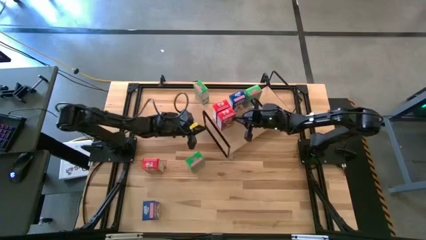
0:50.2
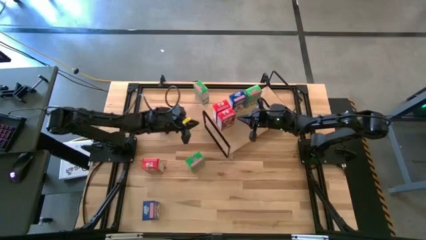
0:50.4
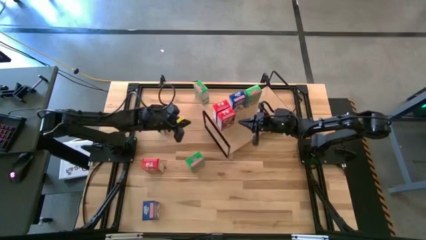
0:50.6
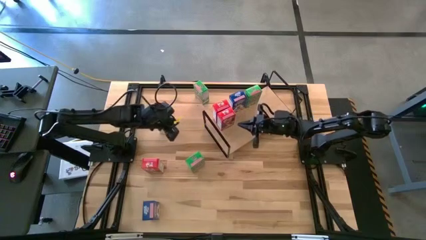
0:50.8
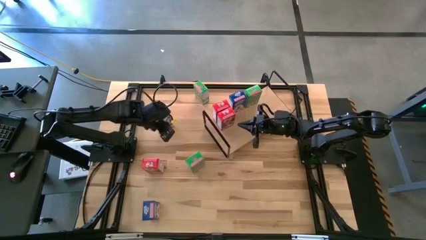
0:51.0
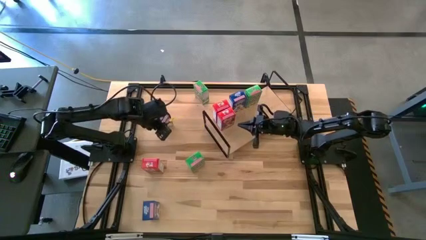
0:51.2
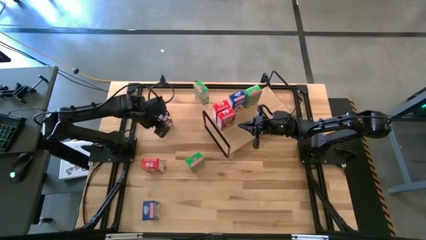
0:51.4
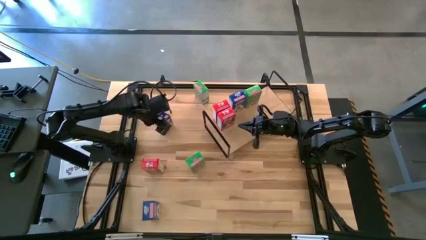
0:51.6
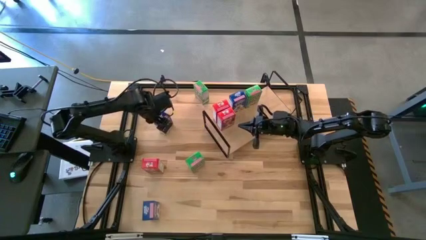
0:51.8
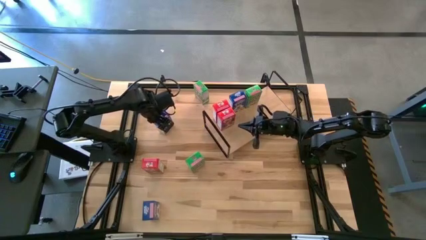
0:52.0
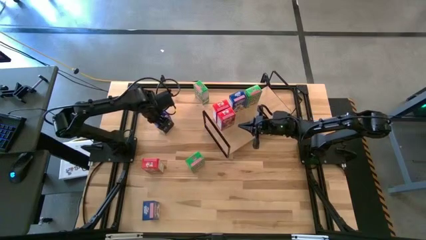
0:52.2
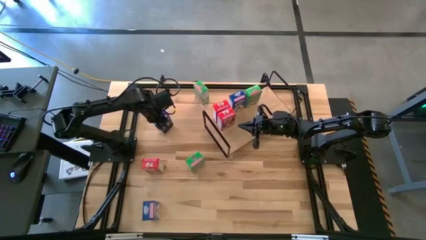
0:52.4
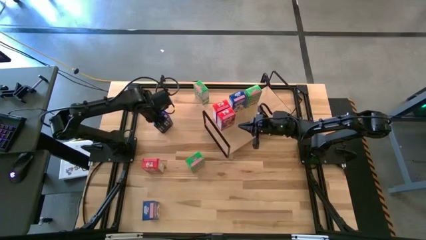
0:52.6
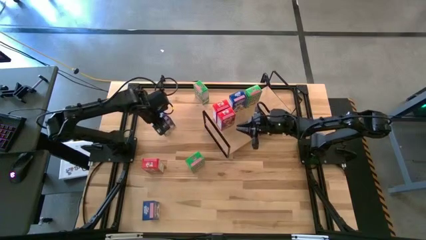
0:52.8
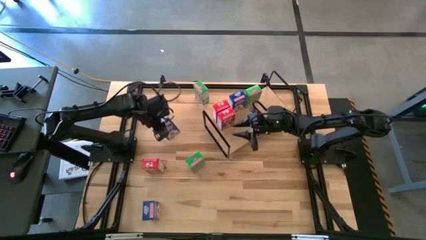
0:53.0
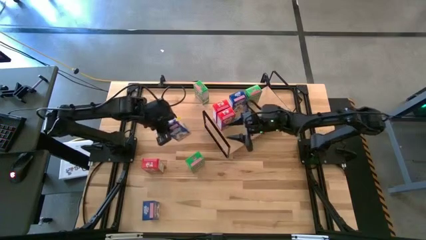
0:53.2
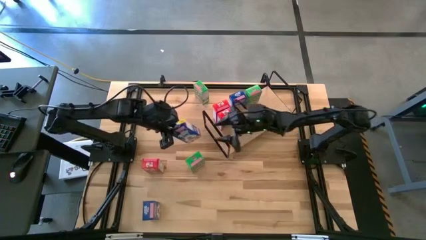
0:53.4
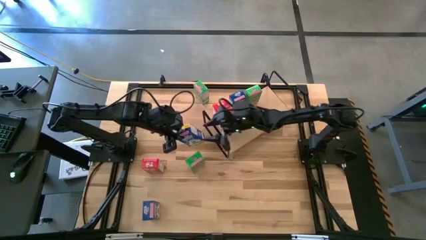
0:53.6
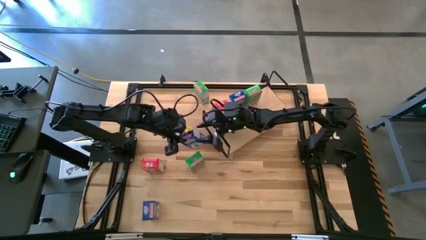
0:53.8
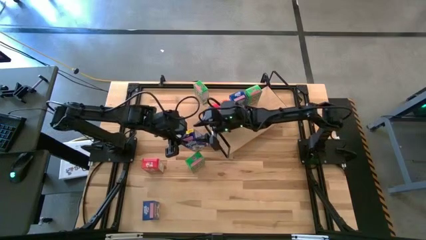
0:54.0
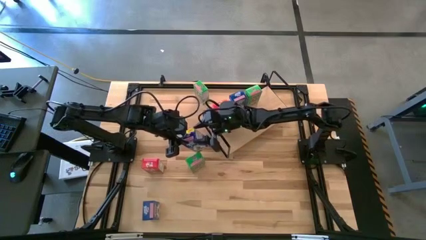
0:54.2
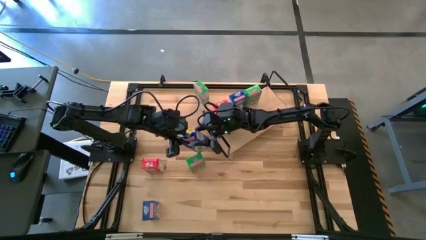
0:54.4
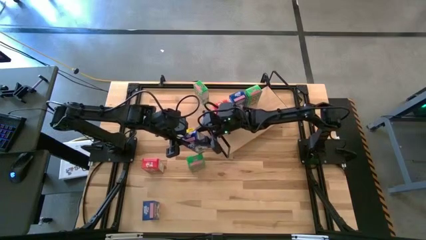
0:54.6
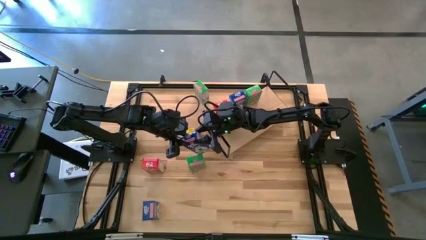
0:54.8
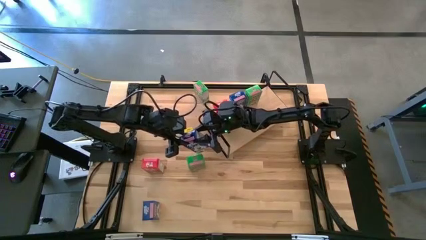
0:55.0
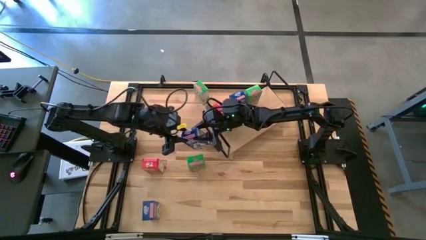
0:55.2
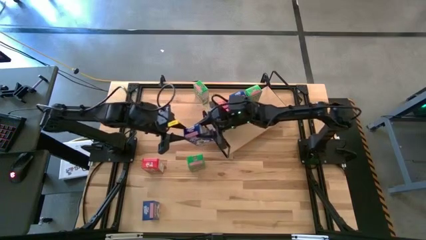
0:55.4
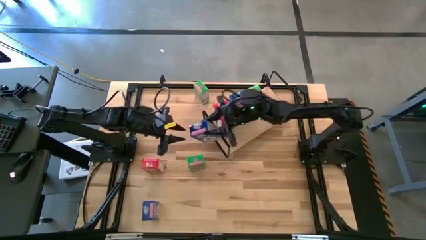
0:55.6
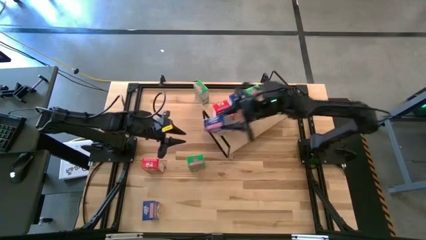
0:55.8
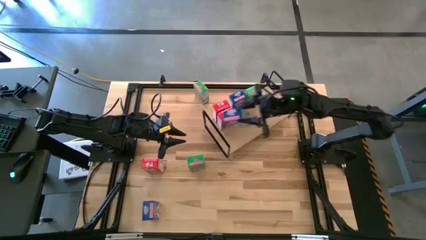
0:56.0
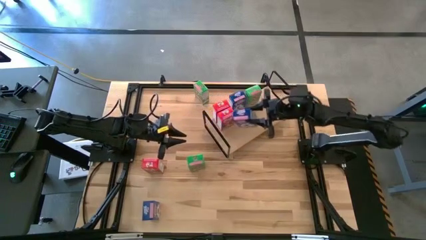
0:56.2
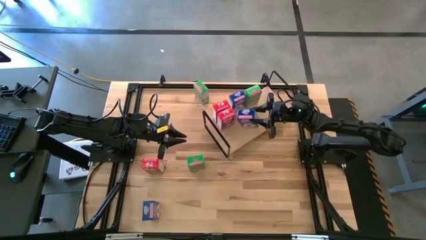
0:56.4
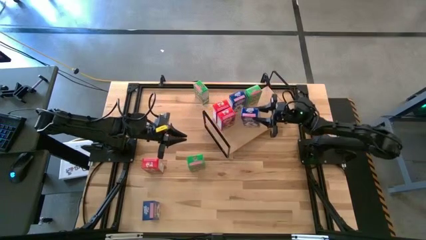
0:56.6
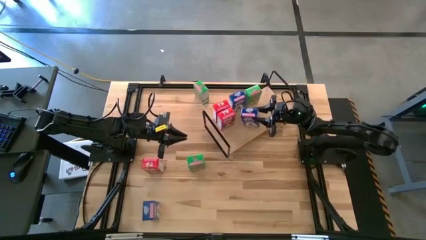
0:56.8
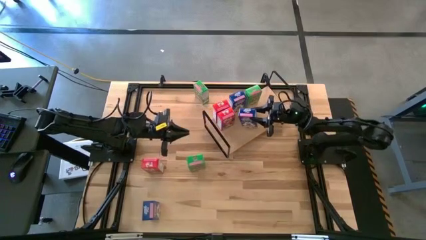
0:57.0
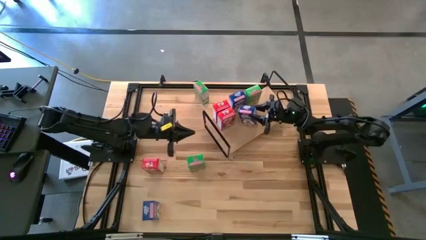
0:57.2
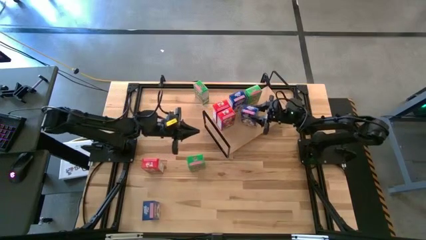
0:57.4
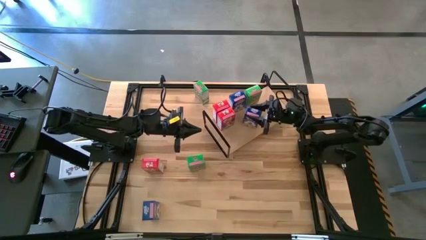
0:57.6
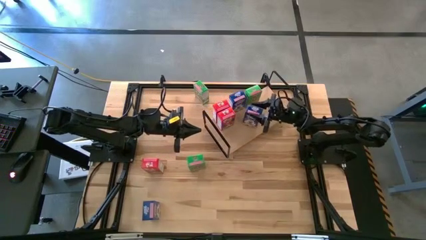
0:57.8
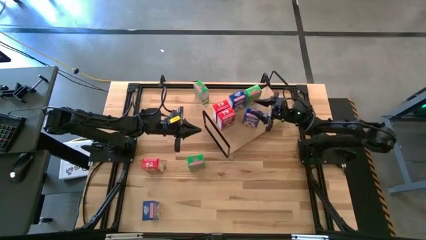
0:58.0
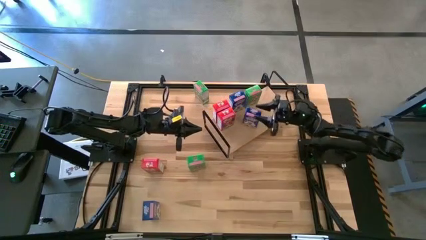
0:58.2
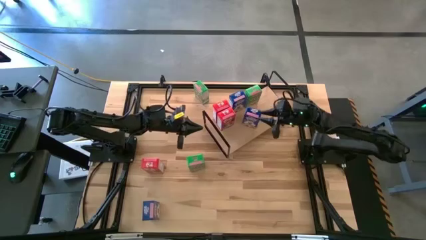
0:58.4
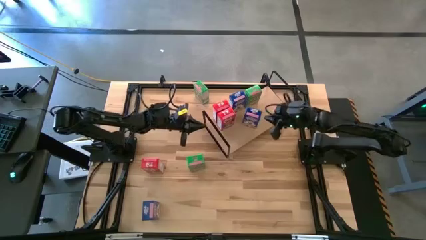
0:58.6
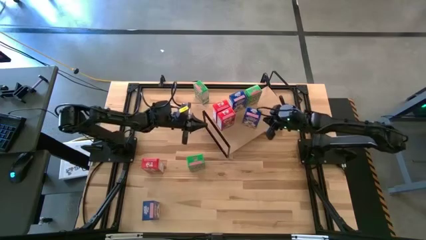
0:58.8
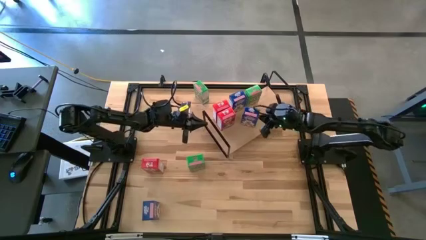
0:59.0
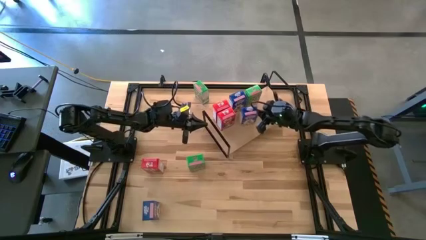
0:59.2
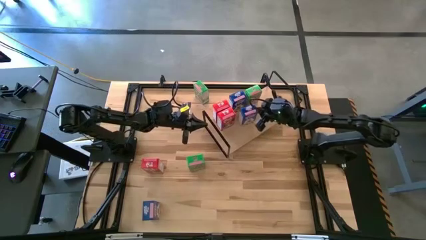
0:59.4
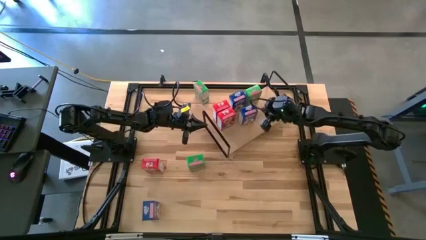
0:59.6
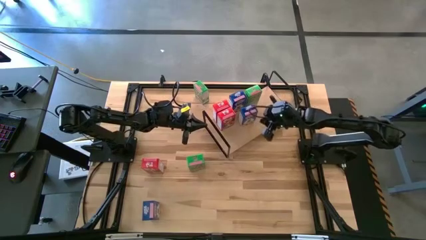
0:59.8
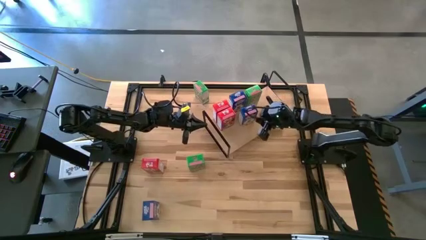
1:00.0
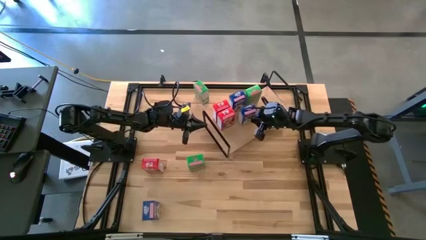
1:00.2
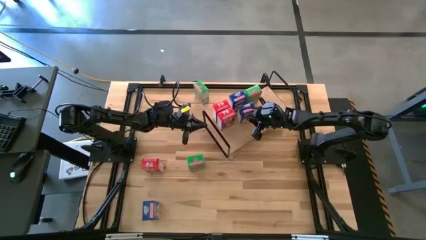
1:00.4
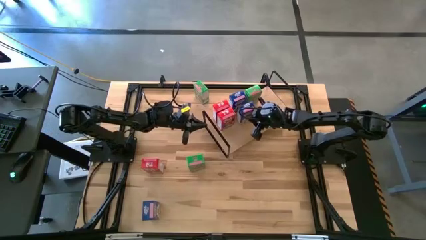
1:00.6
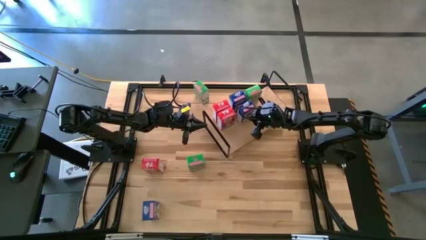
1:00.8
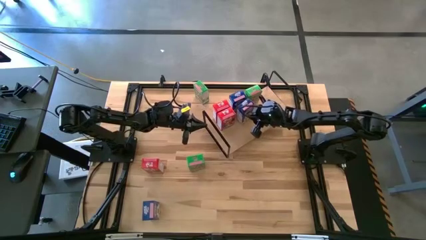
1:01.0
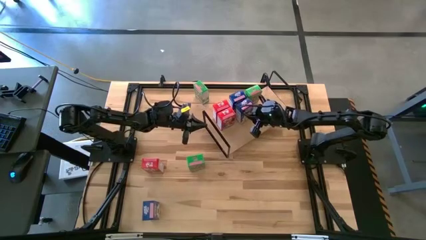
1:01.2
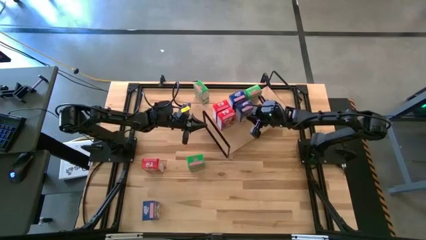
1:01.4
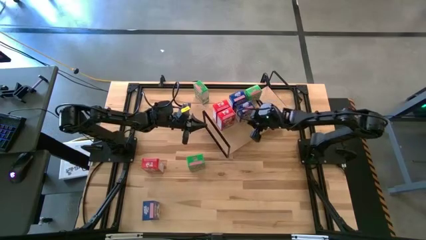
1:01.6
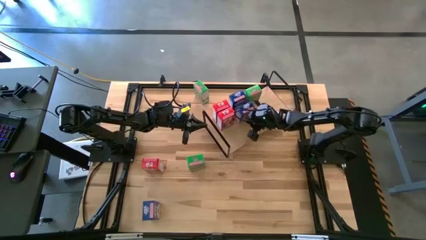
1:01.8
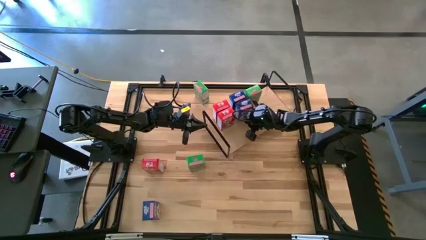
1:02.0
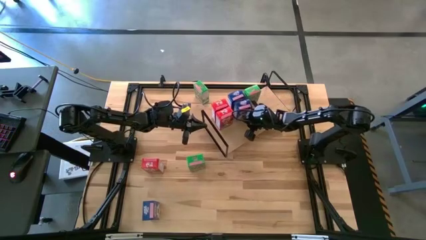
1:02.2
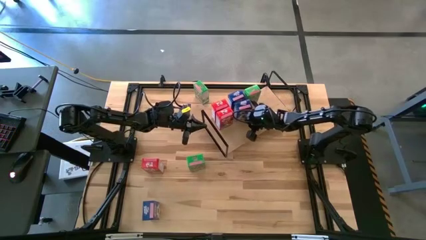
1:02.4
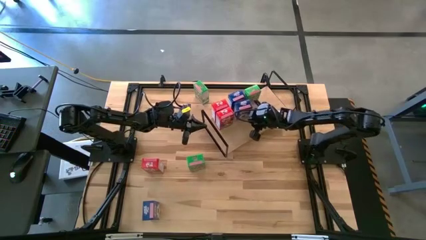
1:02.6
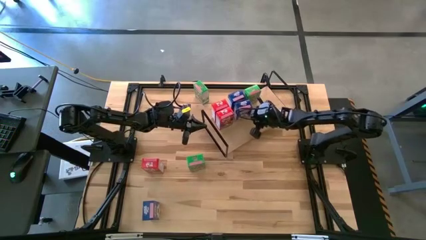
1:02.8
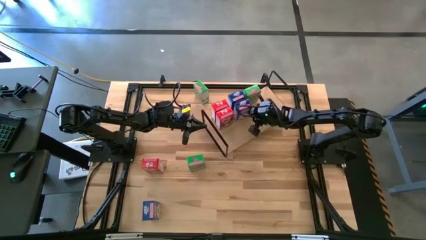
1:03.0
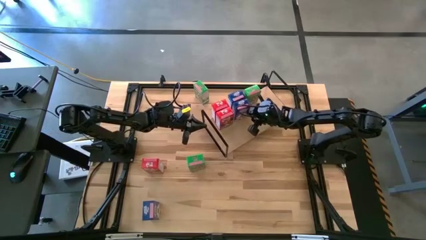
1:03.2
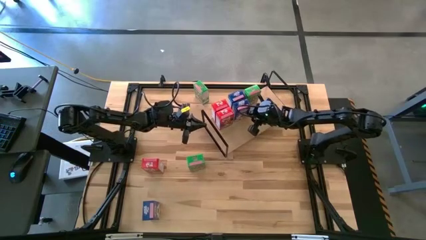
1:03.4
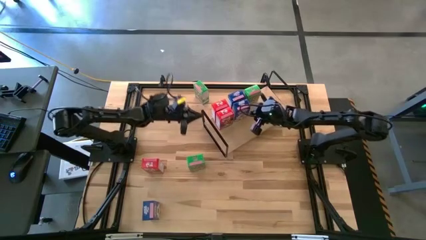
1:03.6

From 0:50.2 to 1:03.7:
Task: Stack cereal on shelf
Put the top blue cereal box on the shelf aligned with the other blue cereal box

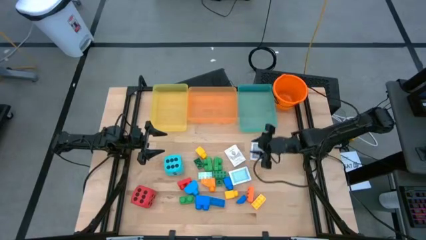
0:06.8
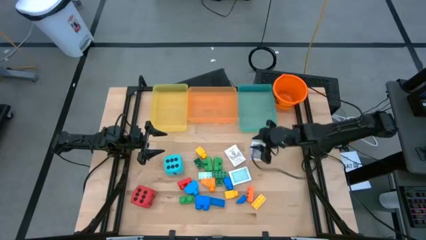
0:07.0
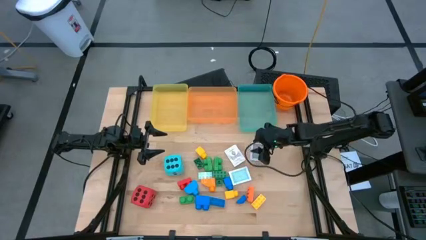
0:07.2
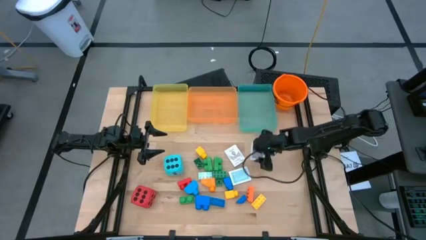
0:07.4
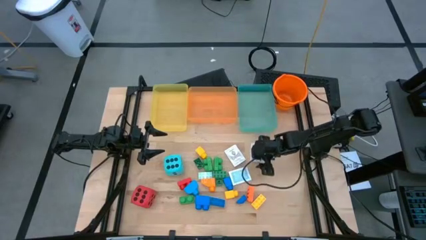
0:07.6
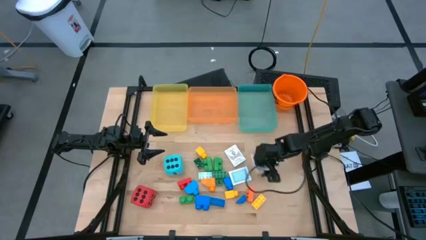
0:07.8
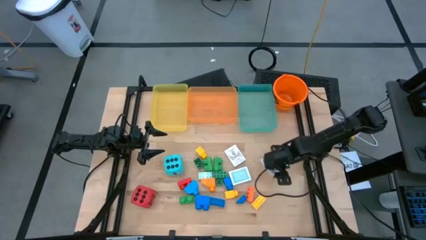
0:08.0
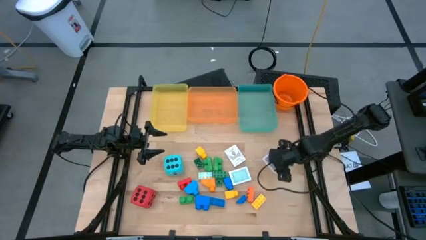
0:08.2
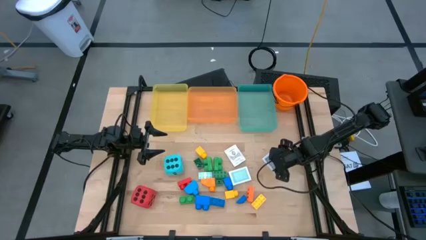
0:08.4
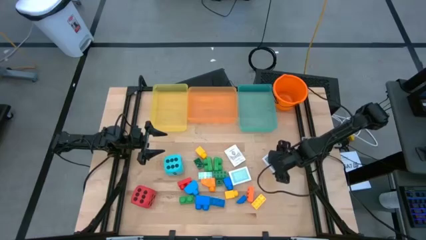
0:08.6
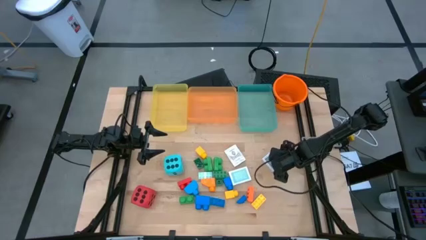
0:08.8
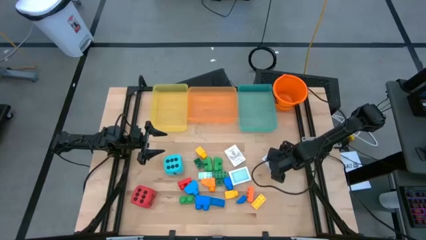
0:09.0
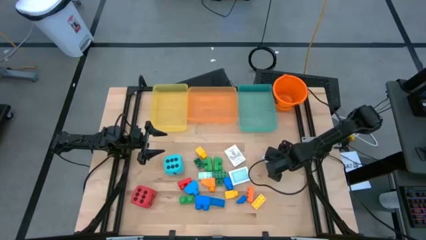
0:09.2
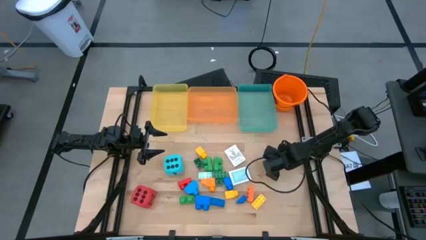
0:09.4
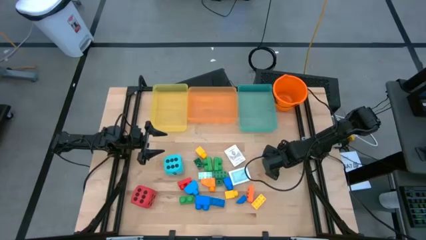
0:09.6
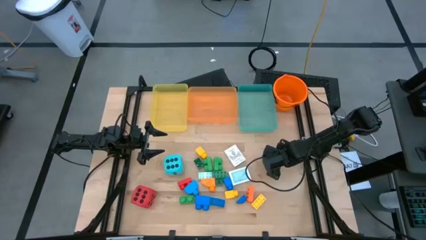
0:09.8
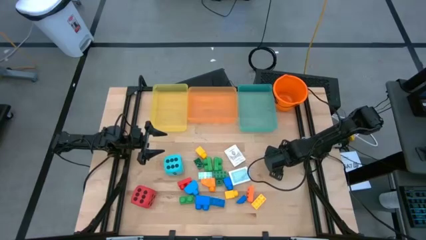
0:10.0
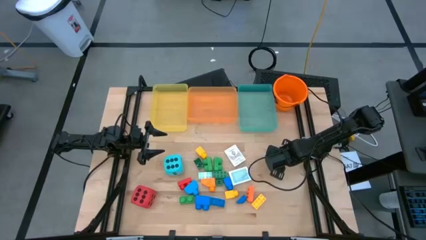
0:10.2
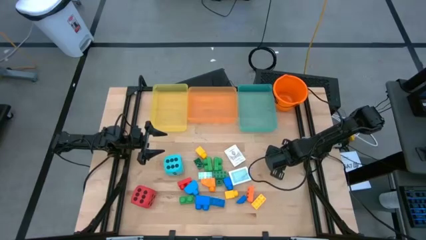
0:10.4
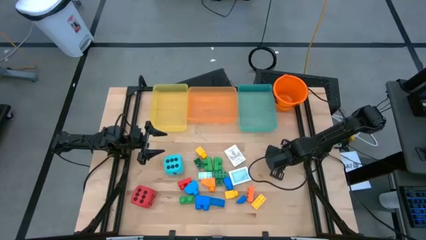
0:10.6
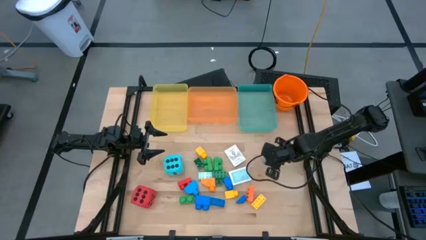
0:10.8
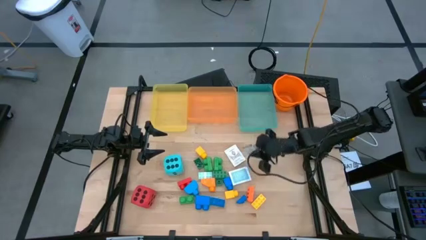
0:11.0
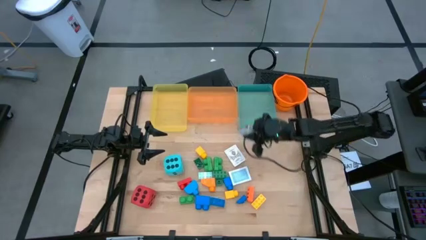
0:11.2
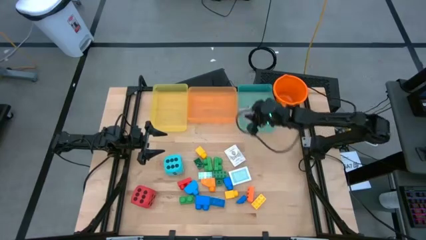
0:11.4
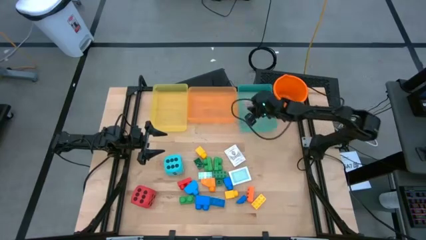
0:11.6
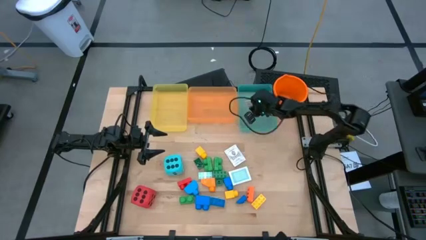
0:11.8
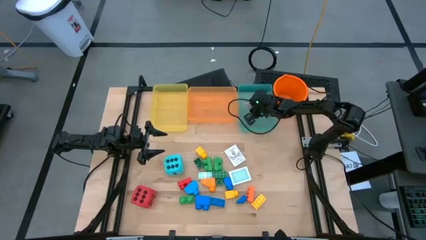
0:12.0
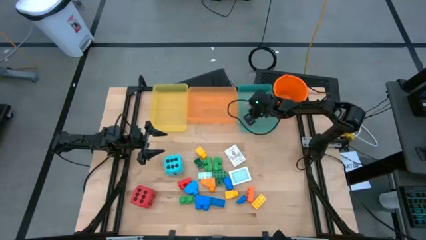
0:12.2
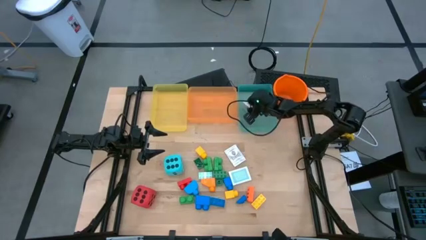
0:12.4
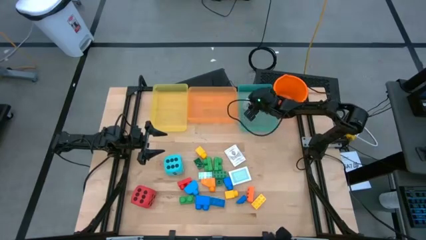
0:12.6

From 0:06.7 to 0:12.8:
Task: Pick & Place Toys
Put the gray game card into the green bin
